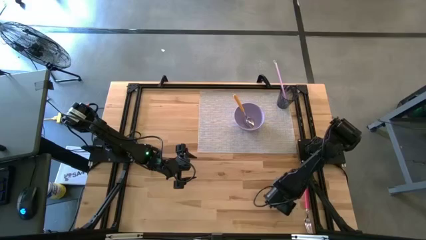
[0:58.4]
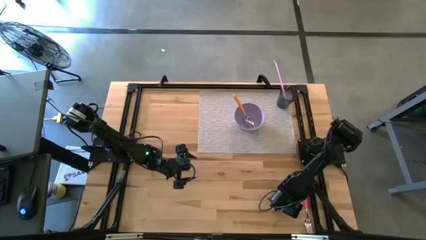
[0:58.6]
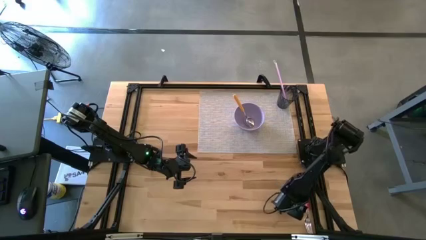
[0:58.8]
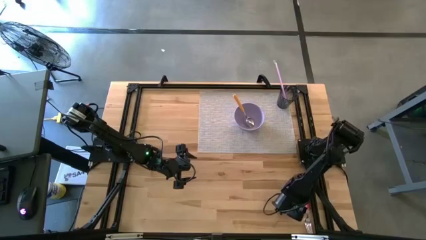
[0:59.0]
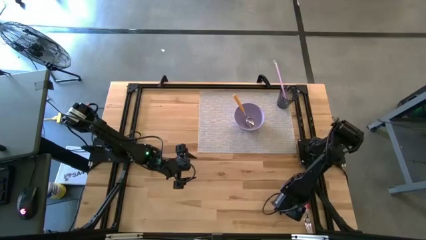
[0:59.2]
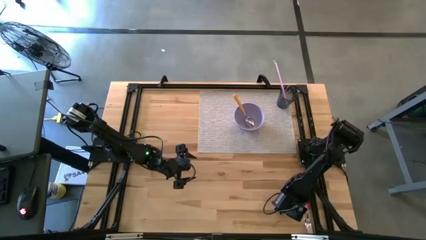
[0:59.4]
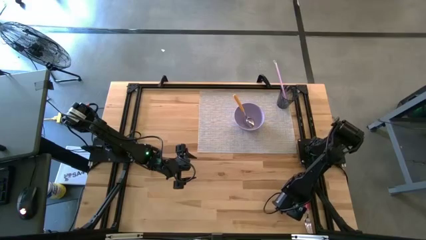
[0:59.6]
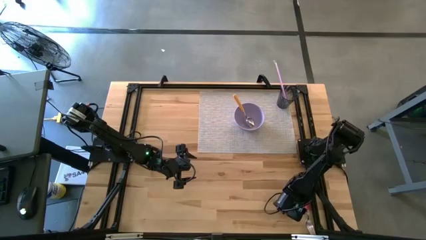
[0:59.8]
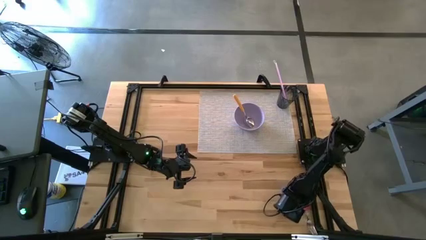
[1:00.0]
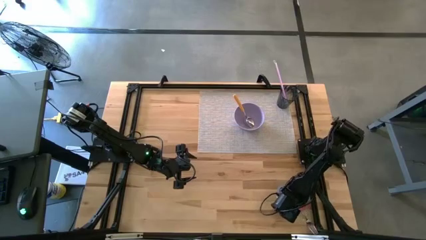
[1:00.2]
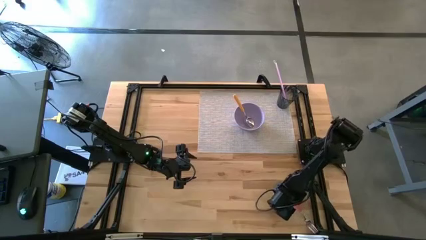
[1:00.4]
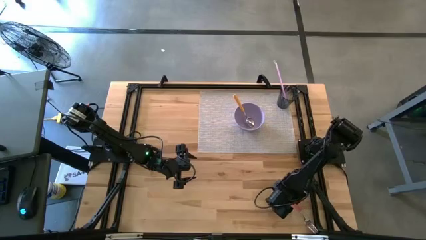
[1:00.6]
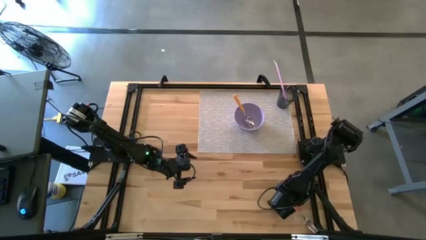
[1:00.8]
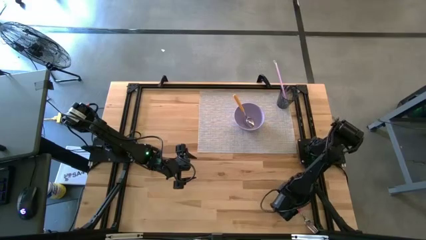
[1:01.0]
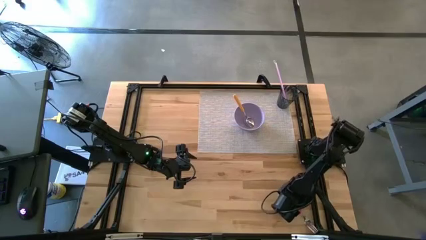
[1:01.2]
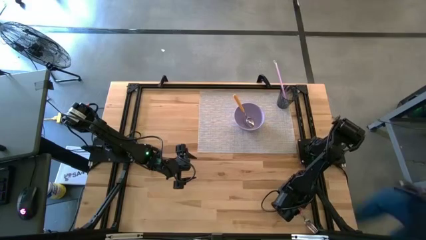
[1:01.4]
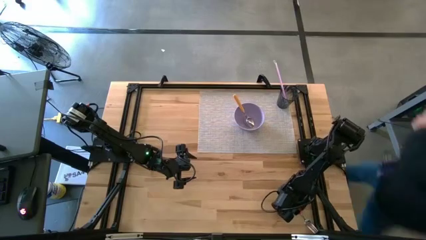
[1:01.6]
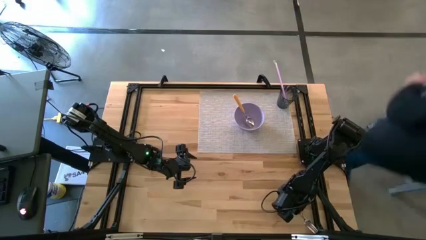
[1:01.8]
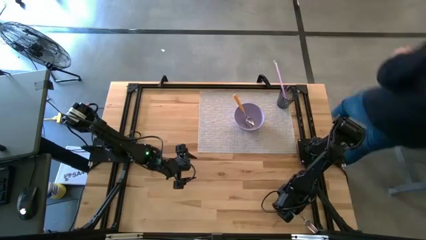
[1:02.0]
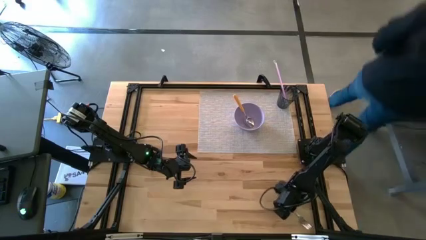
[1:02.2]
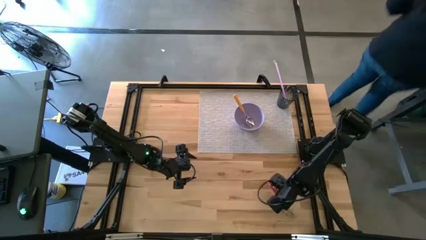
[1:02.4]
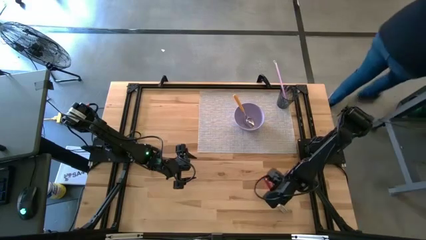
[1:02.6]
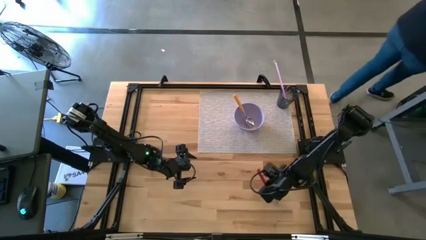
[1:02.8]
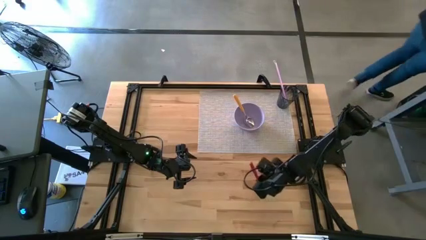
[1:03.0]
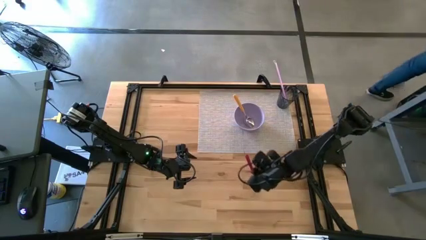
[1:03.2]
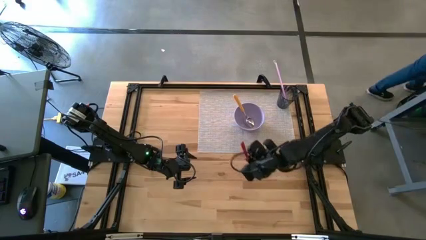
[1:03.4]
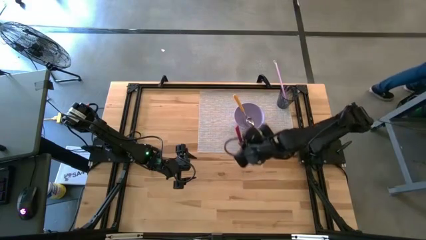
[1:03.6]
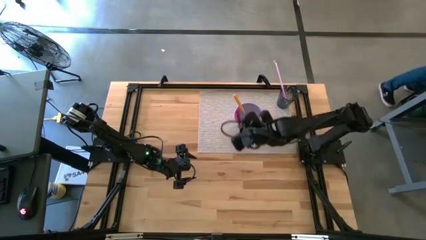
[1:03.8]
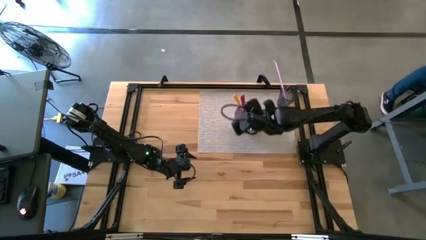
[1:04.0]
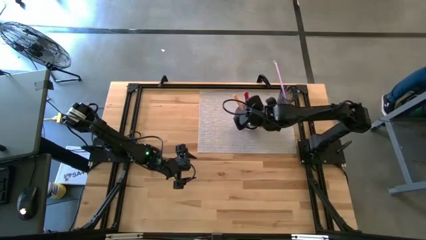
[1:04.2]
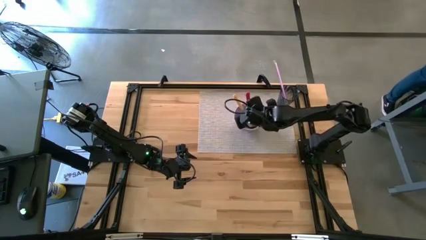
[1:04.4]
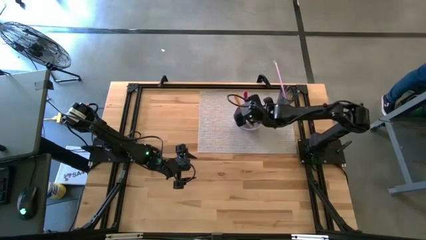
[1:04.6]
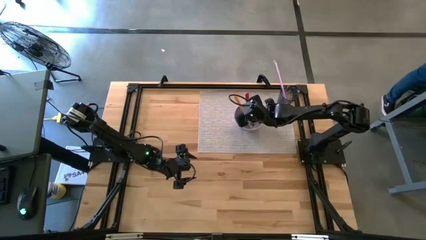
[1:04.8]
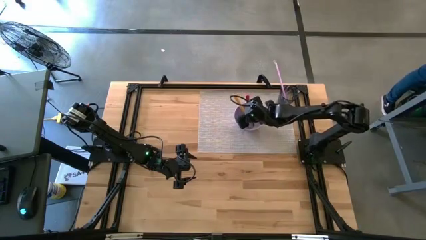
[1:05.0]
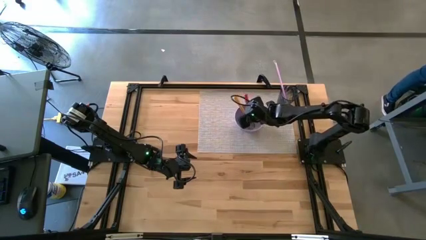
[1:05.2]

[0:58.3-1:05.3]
Task: Pick & Place Utensil
Put the pink fork into the violet bowl

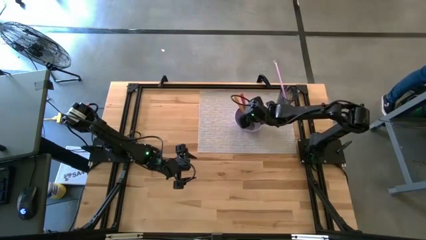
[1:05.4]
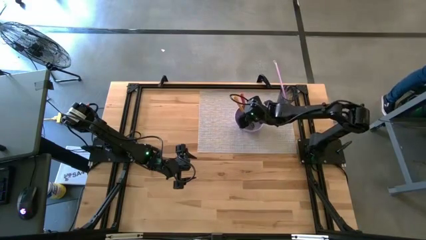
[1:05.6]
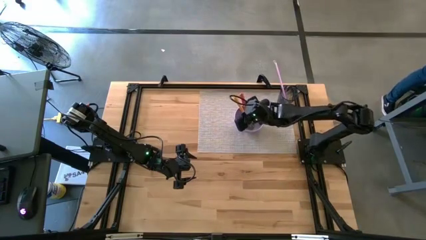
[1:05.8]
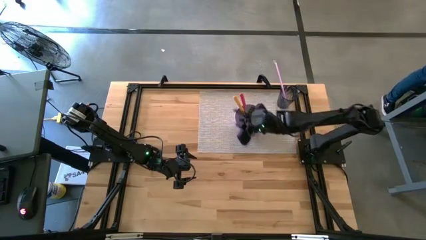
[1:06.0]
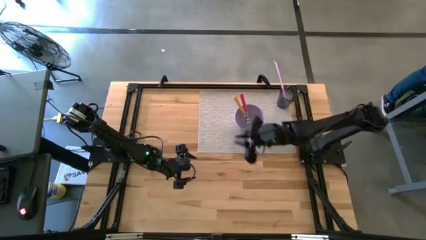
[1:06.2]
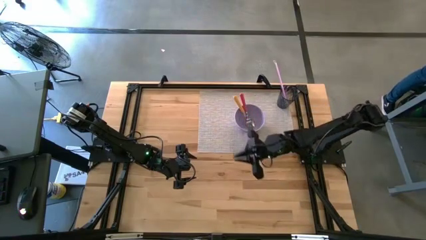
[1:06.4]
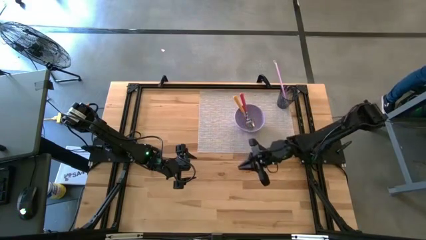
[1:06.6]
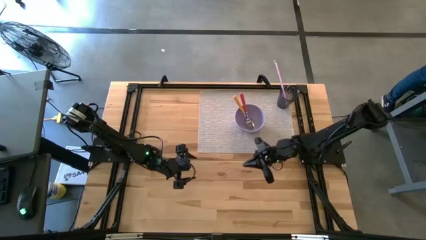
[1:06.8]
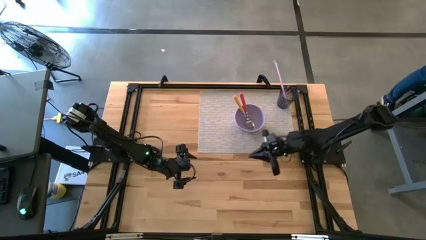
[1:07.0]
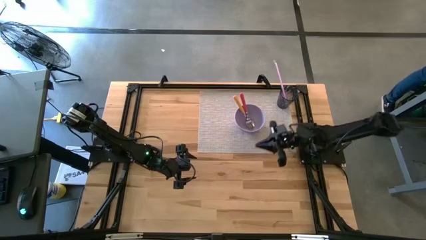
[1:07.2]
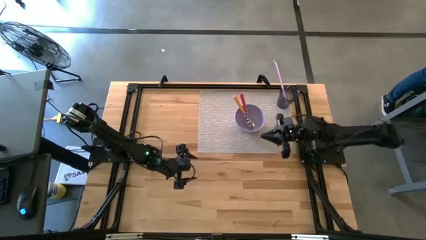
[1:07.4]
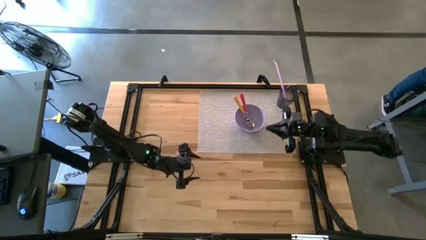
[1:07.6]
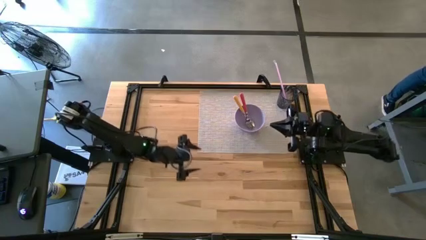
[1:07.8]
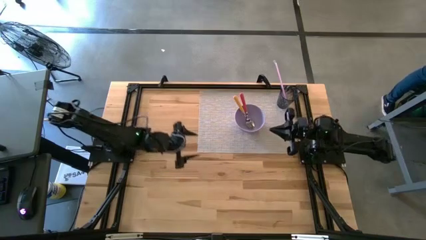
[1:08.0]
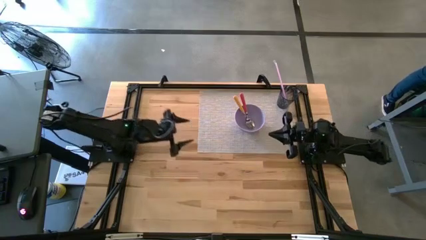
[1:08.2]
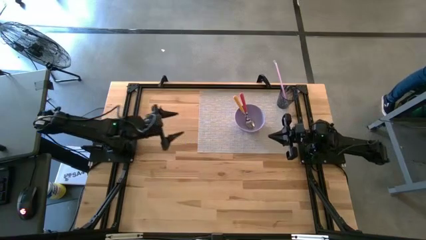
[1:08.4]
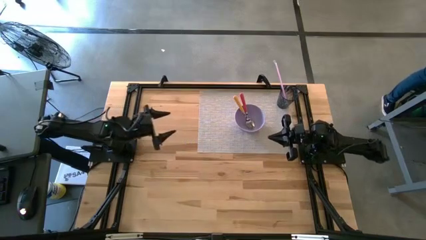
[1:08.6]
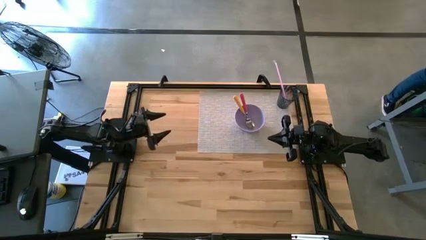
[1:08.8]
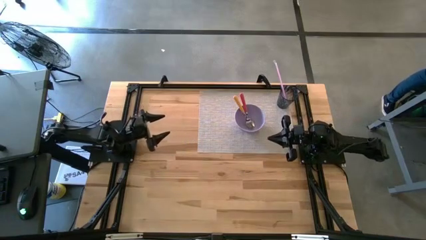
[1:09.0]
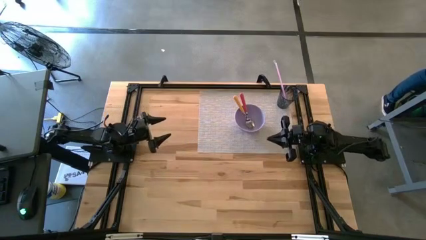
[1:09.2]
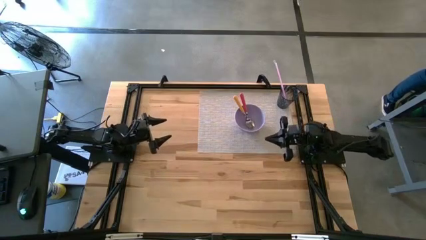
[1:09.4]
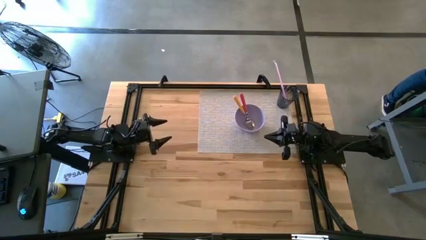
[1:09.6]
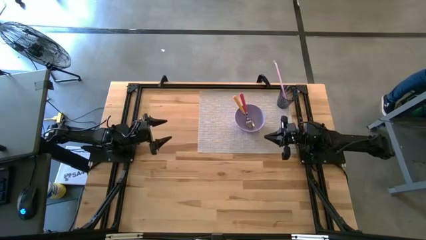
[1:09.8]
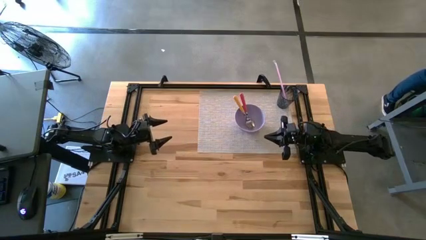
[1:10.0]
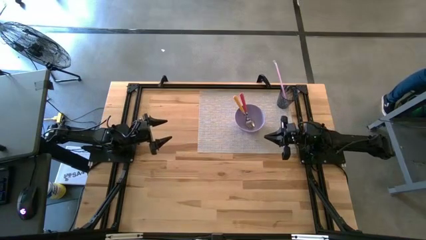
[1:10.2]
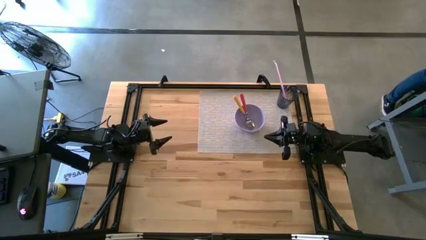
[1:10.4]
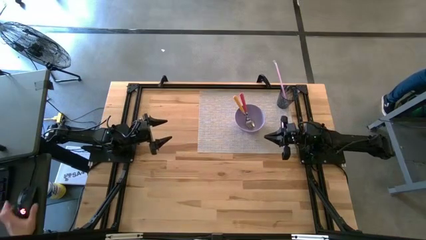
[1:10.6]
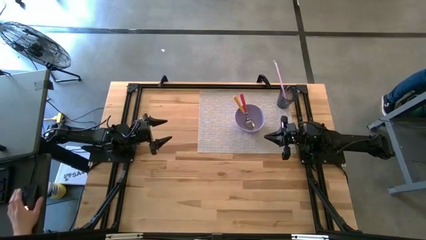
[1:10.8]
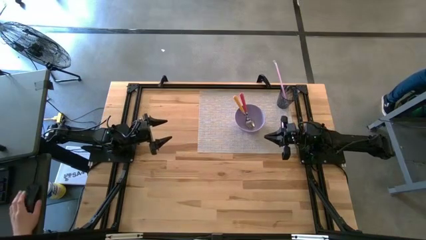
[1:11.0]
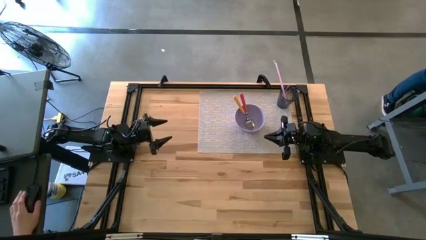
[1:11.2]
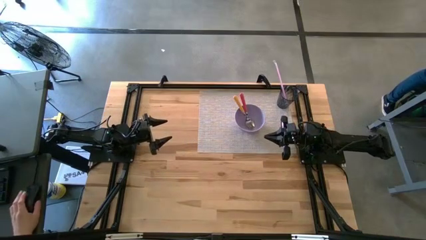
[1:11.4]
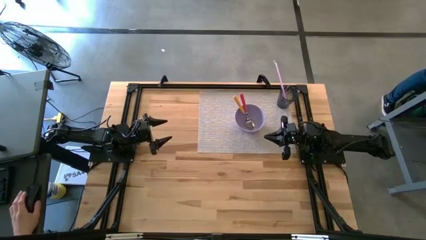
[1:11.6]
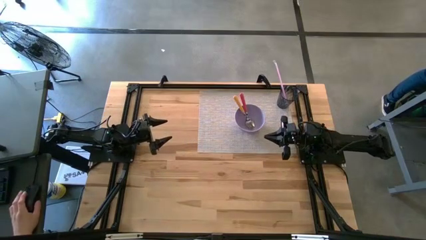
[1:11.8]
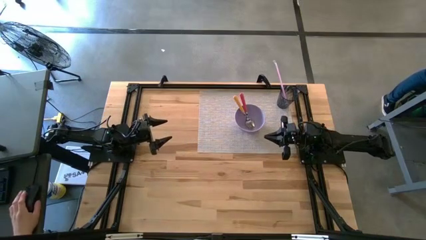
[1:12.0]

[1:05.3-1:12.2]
Return to Home Position

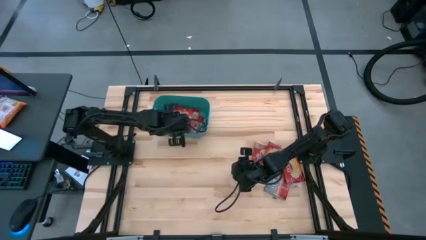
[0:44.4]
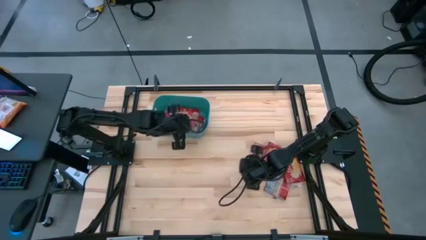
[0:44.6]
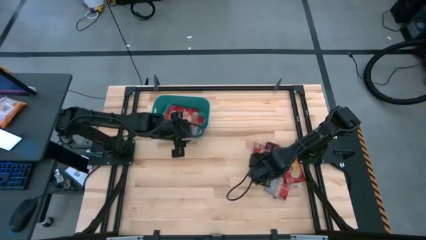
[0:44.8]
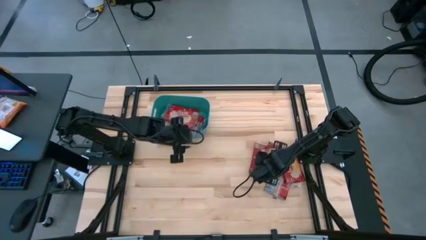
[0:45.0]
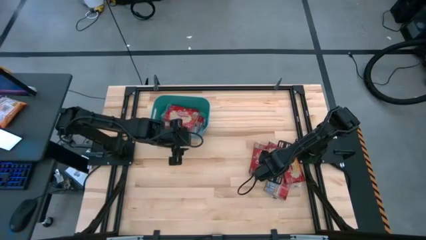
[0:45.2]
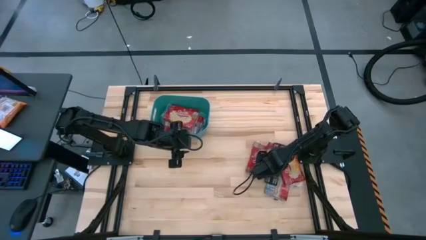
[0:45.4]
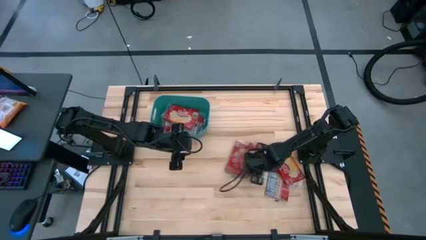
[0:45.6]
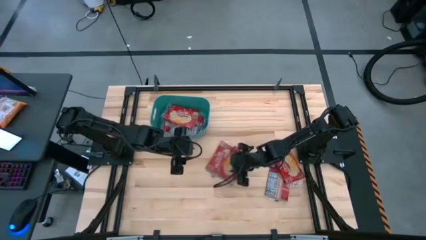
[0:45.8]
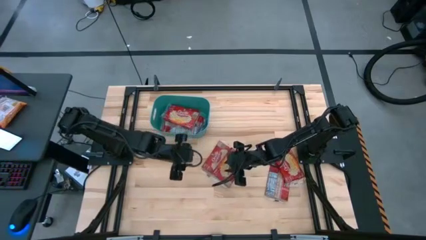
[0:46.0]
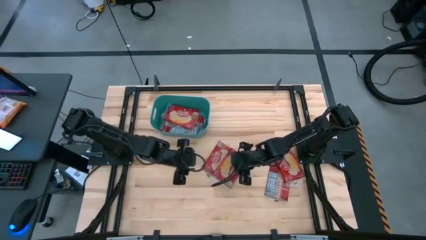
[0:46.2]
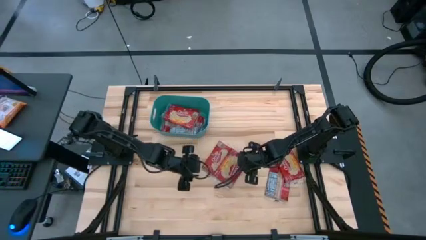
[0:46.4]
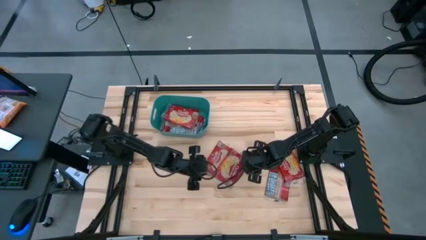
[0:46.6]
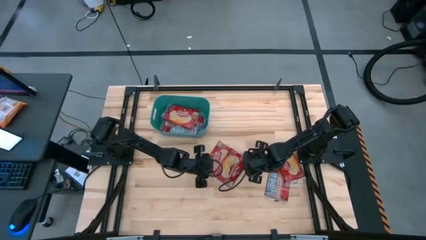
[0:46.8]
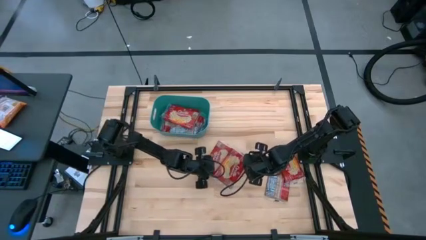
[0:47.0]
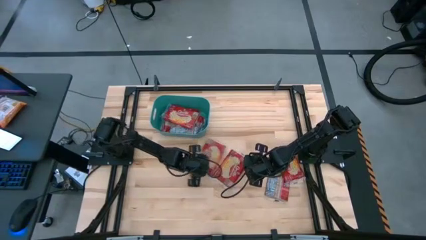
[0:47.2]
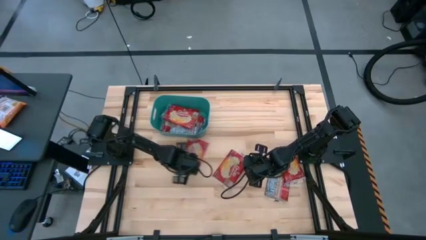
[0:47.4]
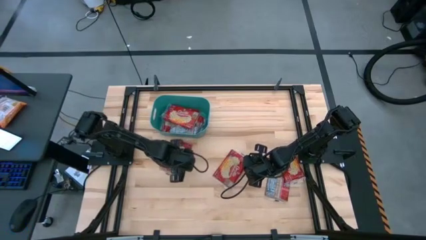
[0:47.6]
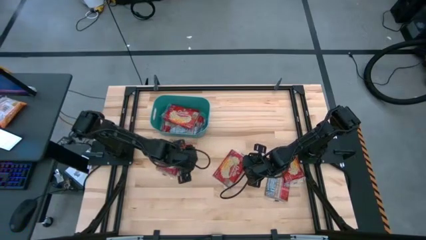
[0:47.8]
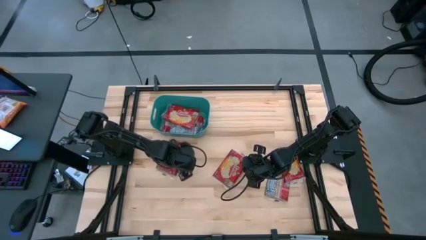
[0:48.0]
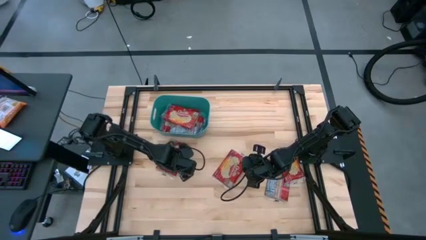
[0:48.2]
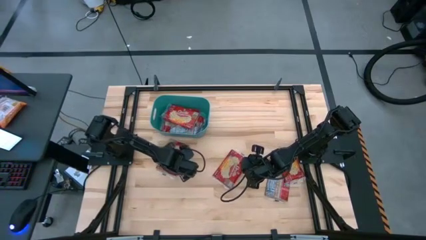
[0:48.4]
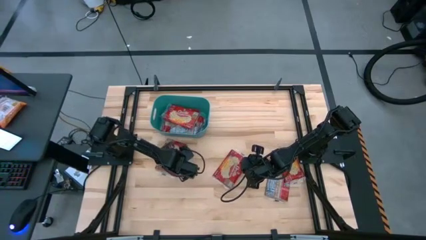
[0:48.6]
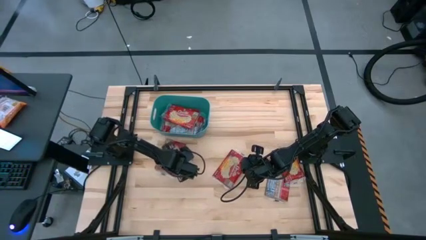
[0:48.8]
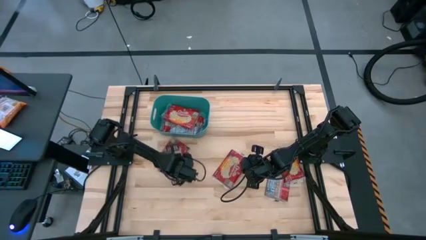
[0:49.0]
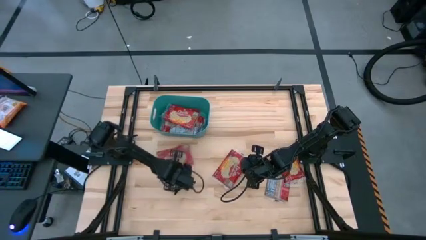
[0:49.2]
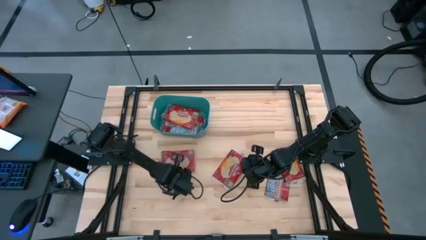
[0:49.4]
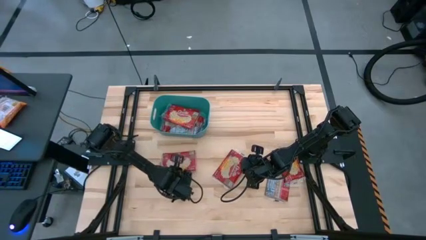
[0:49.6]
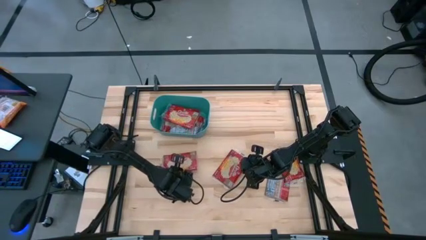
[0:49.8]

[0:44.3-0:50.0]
Task: Sort popcorn bags into baskets
Put the red popcorn pack into the green bin
